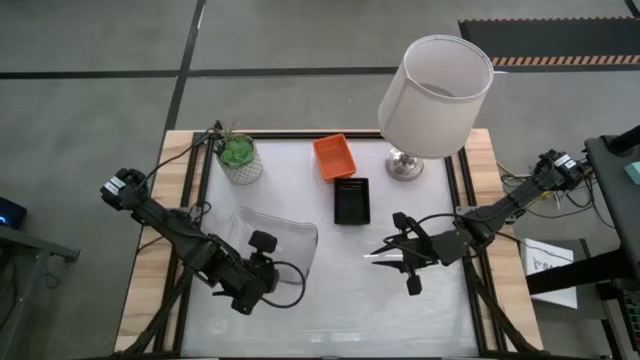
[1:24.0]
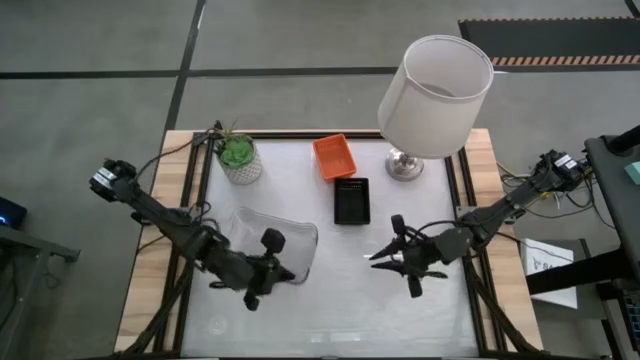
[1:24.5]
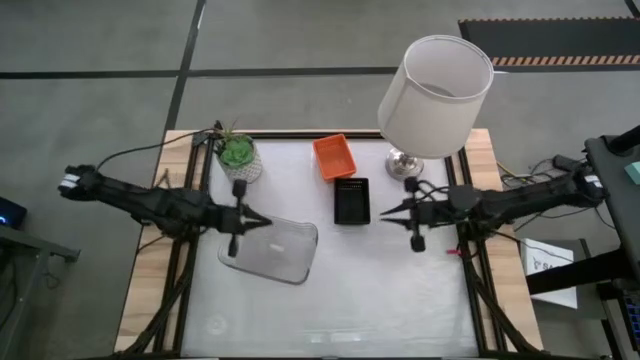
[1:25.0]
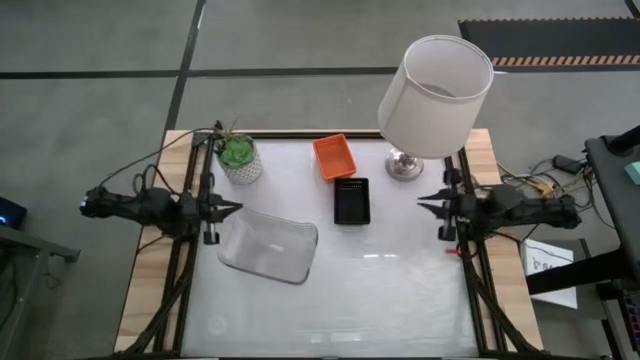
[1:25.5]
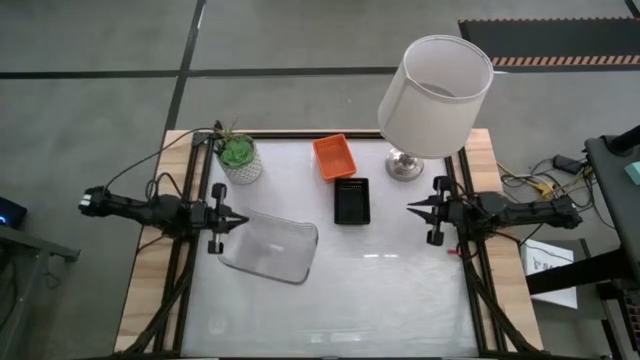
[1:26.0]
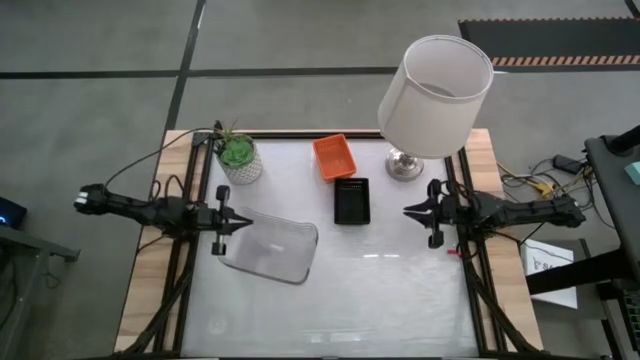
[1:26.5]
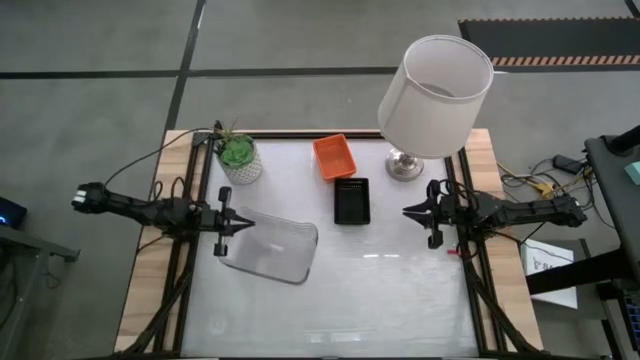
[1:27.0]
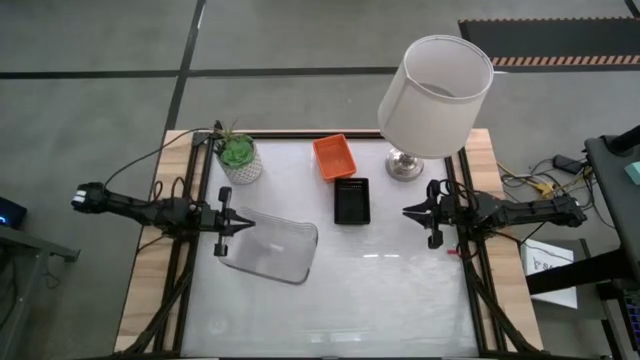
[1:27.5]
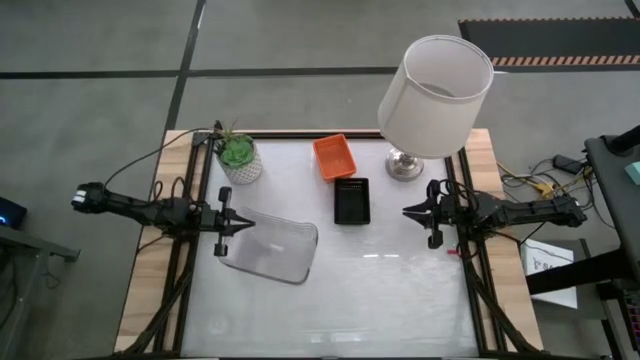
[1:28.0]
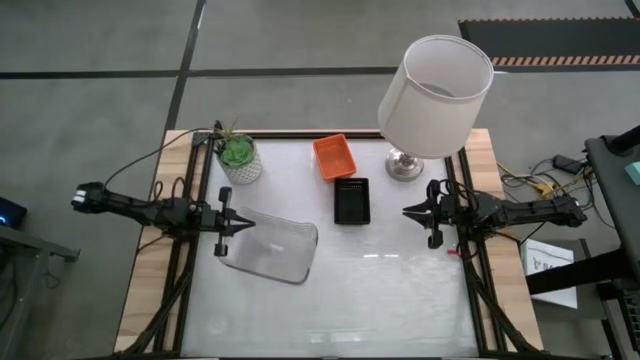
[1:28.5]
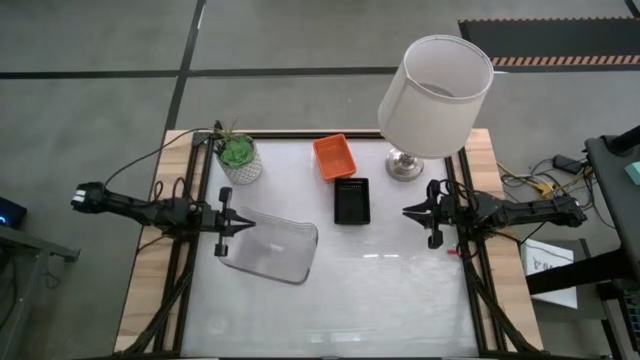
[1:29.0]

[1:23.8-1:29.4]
Return to Home Position

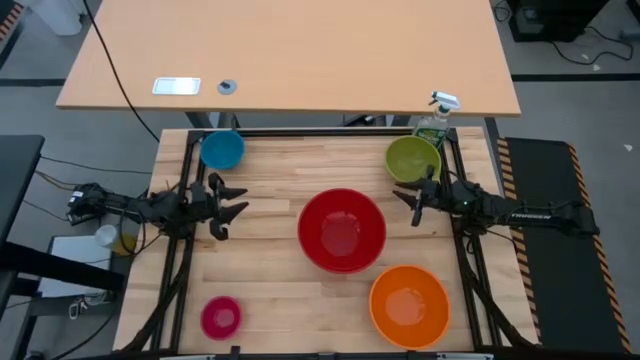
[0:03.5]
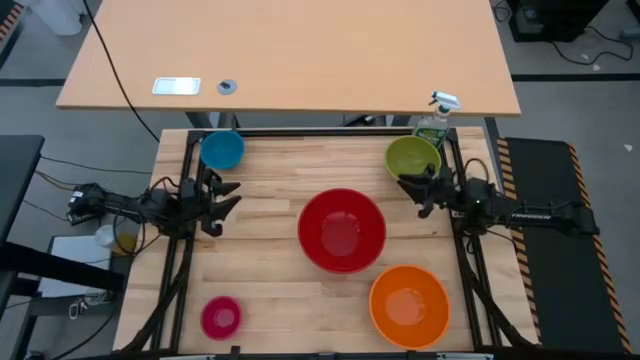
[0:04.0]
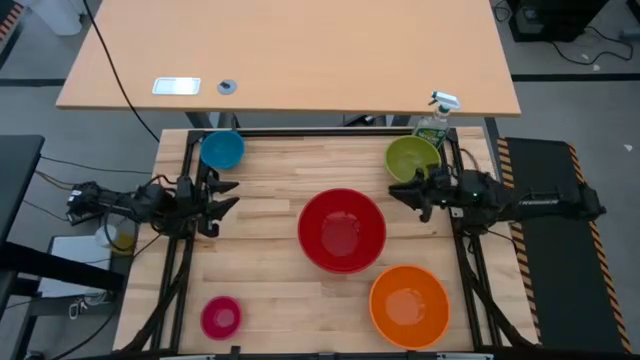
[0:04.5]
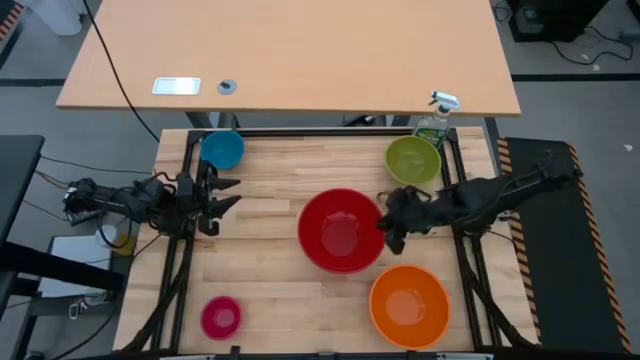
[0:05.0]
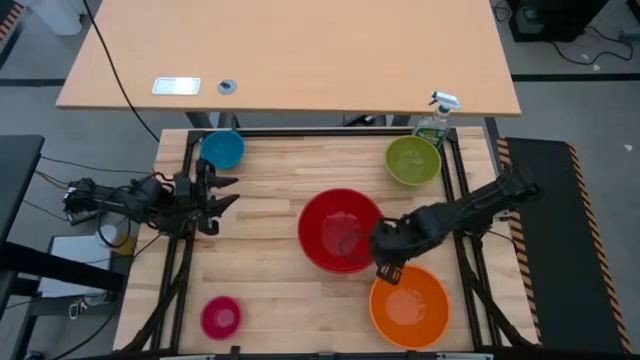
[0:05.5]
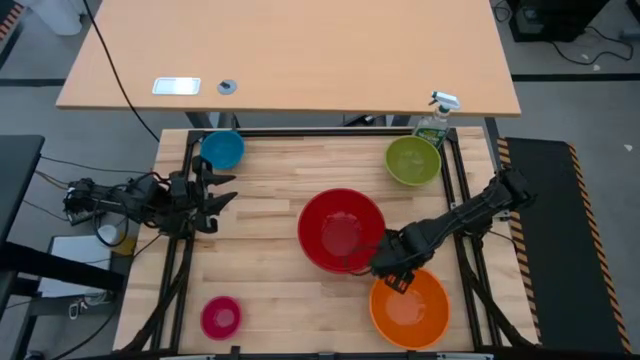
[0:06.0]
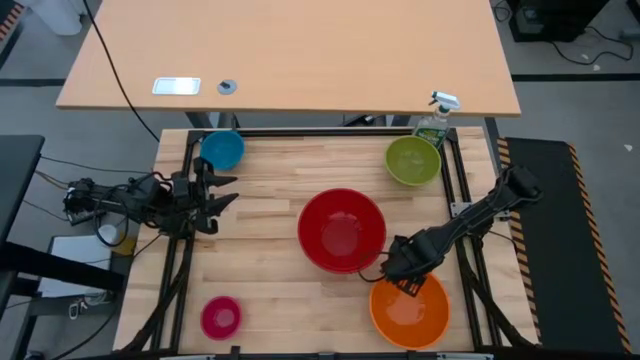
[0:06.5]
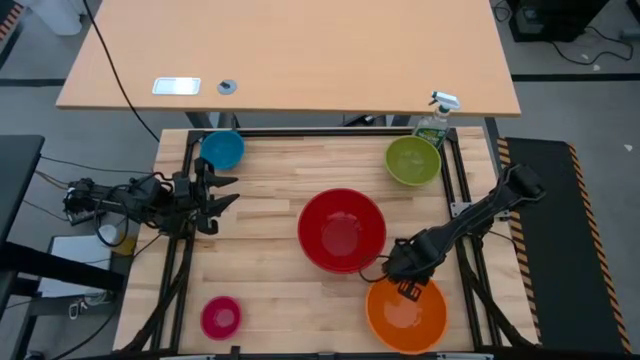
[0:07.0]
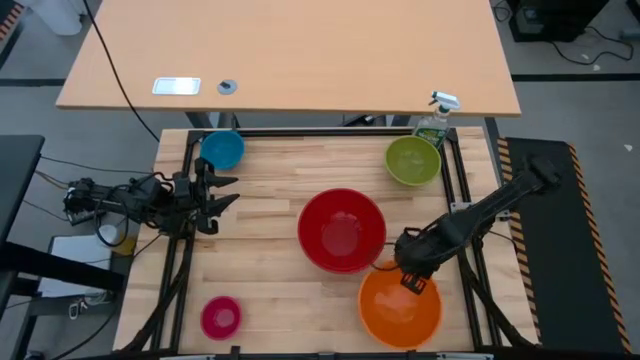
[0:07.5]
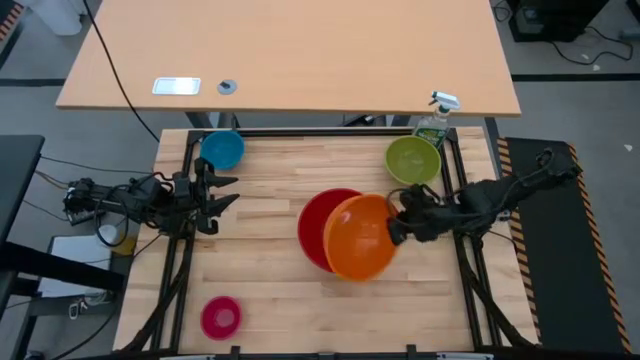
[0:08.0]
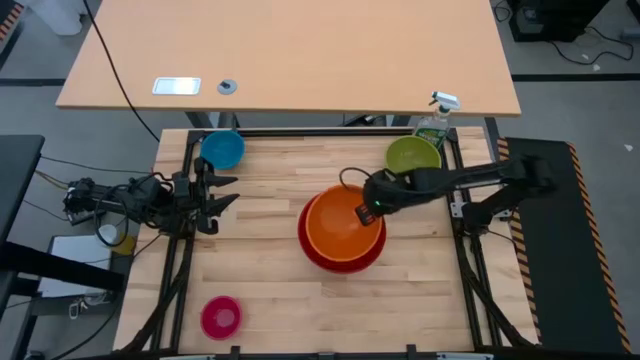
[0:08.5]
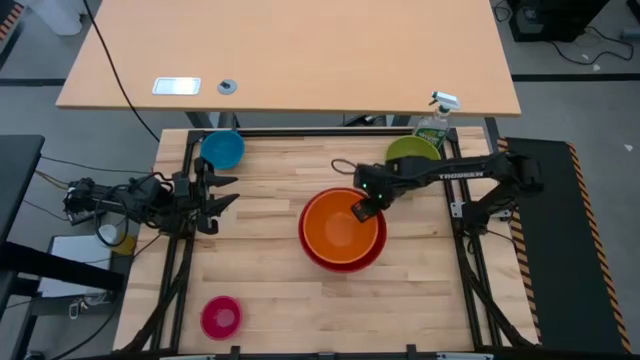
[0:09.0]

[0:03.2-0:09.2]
Stack the orange bowl on the red bowl

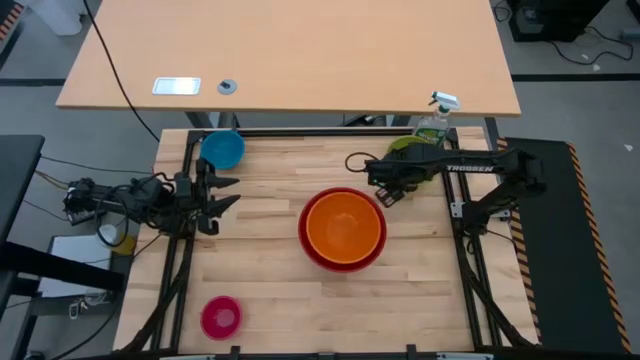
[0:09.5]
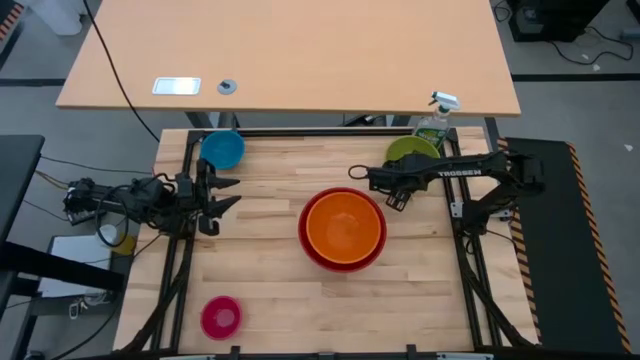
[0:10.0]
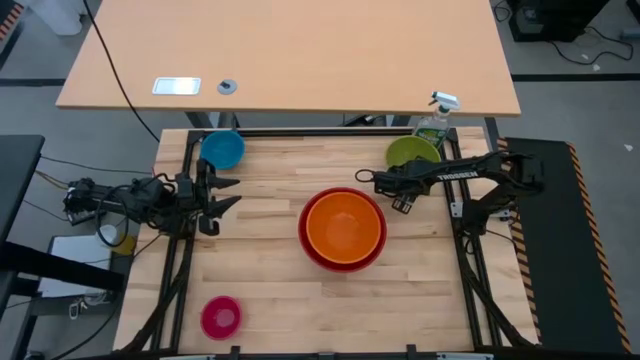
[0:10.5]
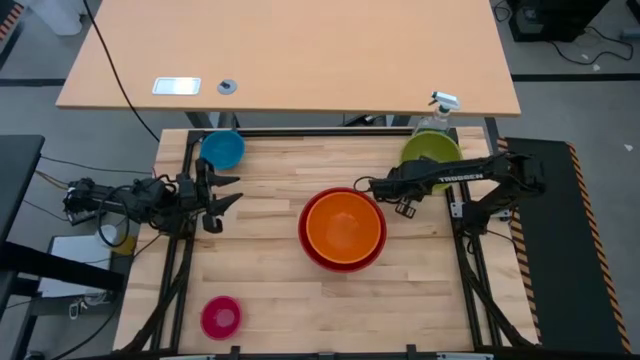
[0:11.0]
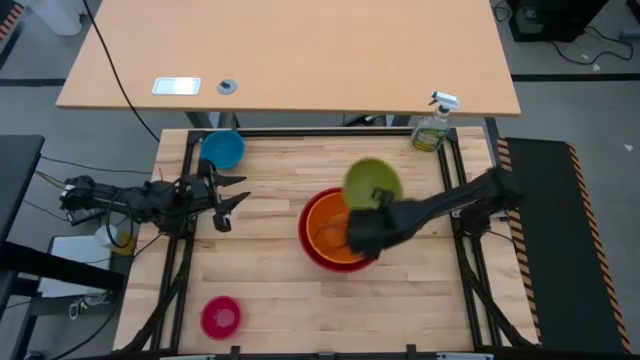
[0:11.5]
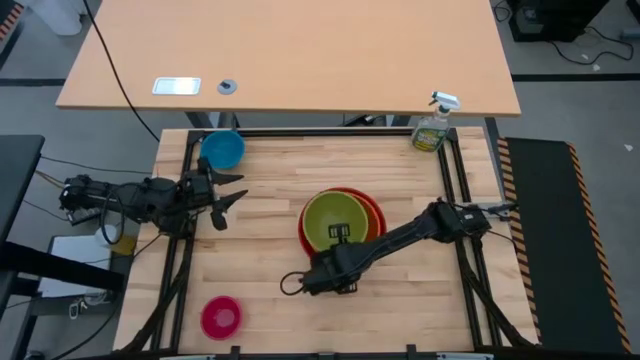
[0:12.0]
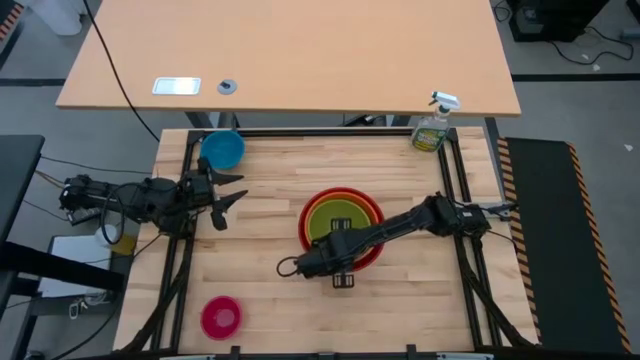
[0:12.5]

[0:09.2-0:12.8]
Stack the green bowl on the orange bowl

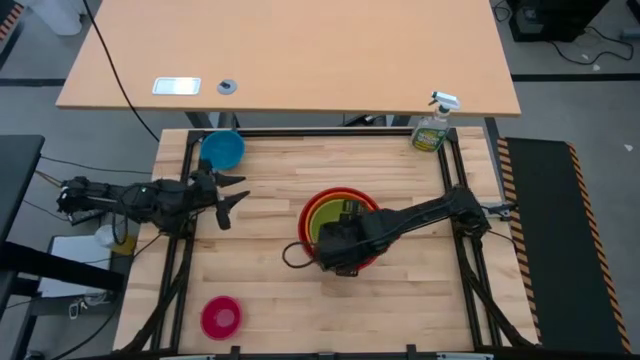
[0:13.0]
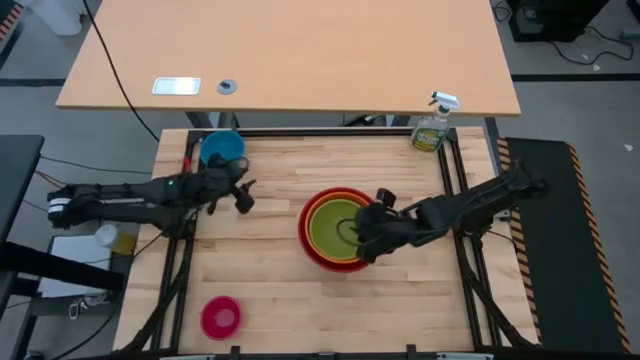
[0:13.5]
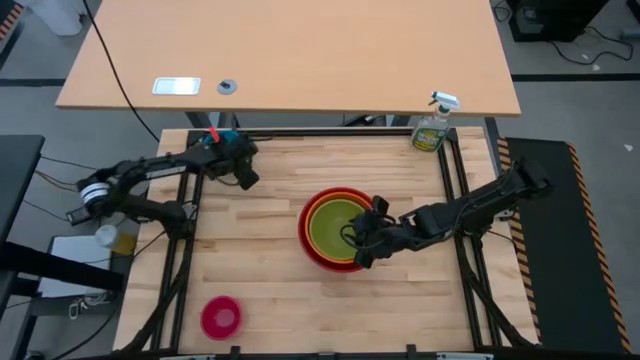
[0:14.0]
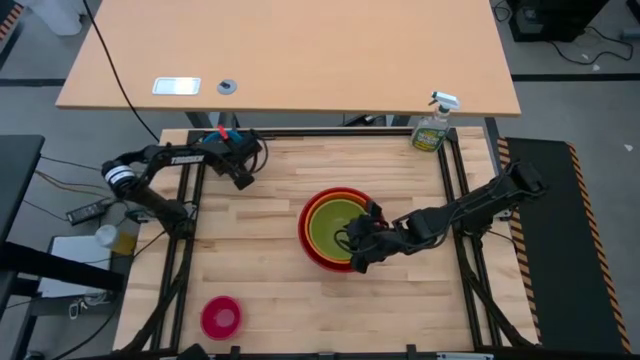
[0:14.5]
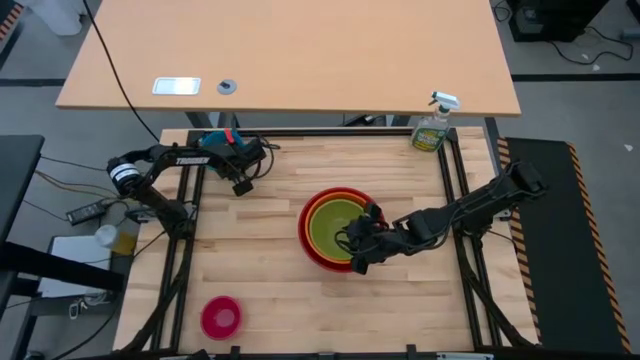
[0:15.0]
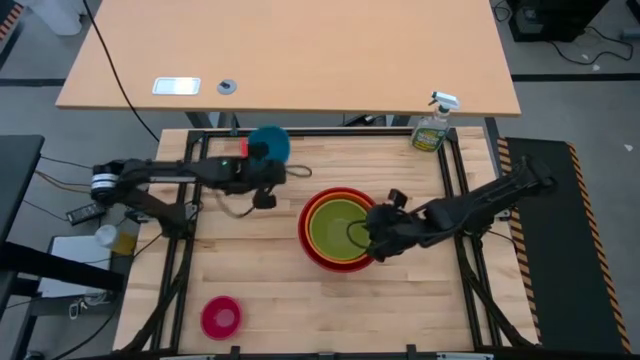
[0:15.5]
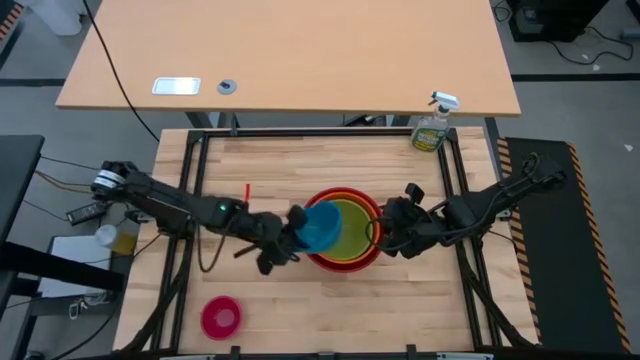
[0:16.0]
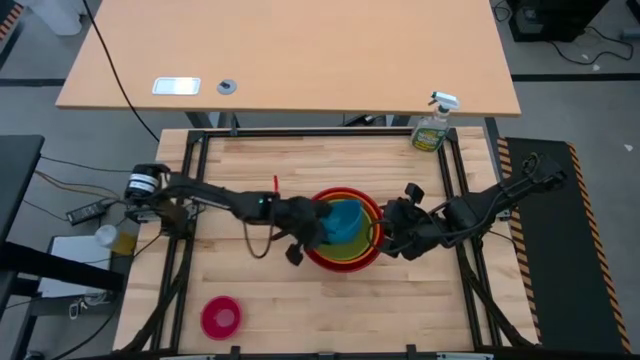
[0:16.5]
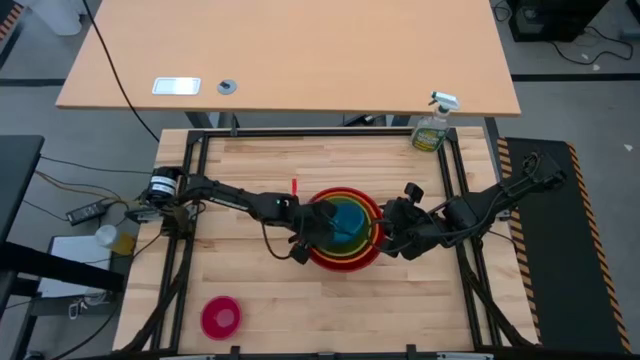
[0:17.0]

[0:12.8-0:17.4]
Stack the blue bowl on the green bowl

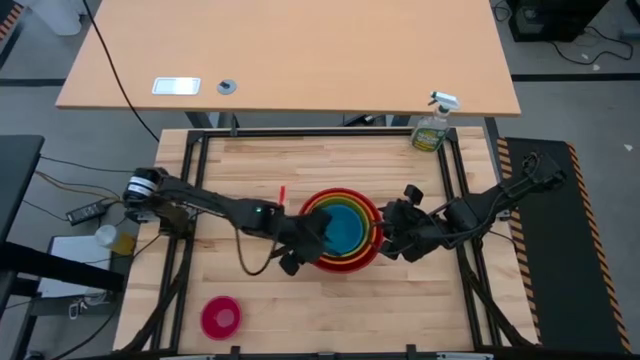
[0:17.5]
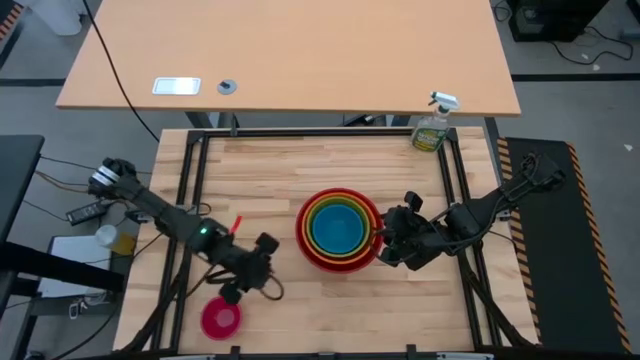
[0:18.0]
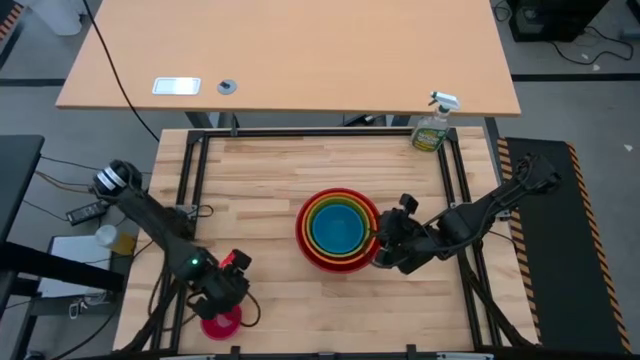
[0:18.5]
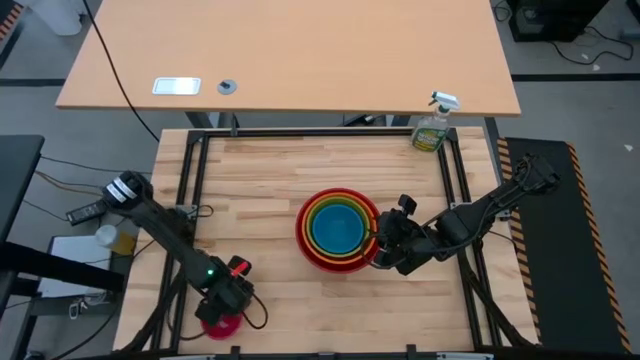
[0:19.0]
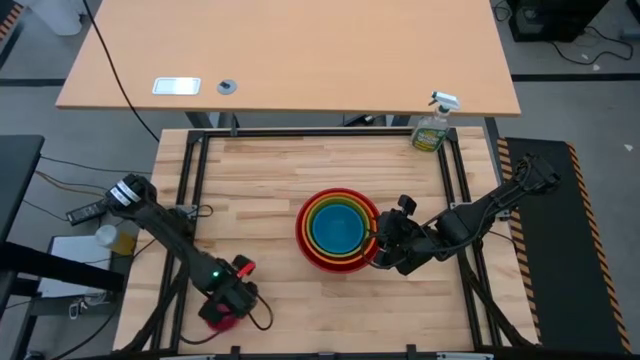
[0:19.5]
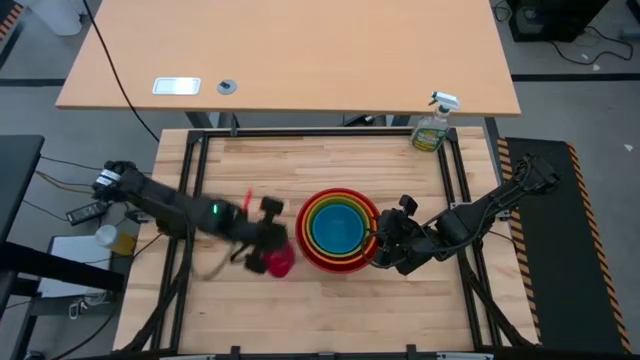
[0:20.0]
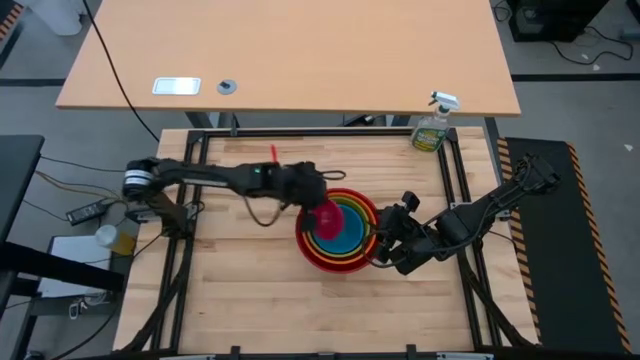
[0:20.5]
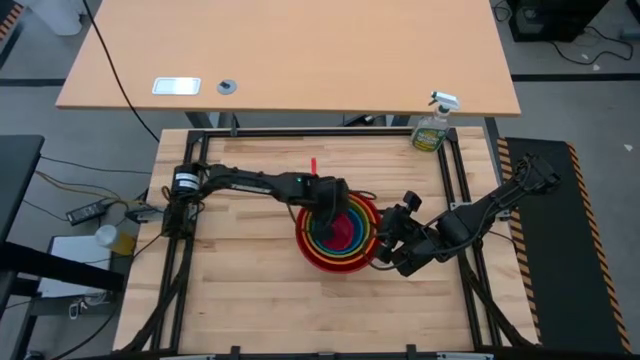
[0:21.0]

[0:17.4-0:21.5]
Stack the pink bowl on the blue bowl
